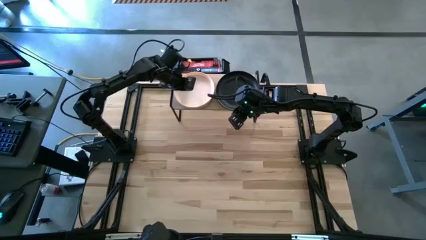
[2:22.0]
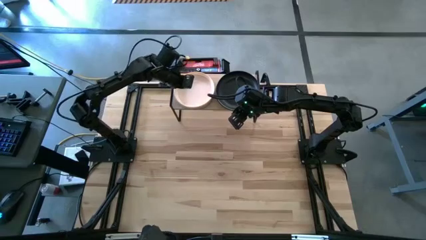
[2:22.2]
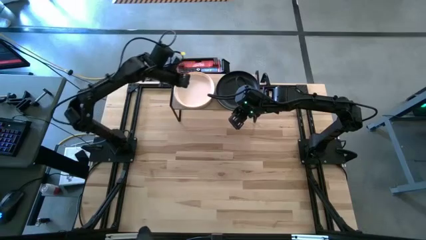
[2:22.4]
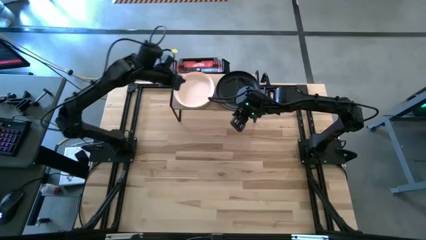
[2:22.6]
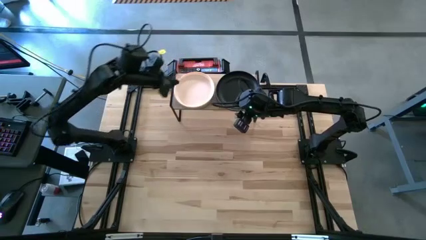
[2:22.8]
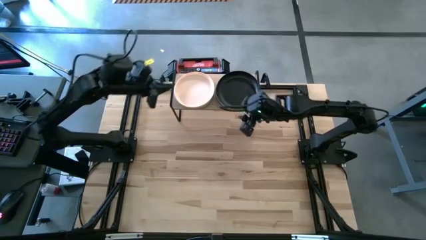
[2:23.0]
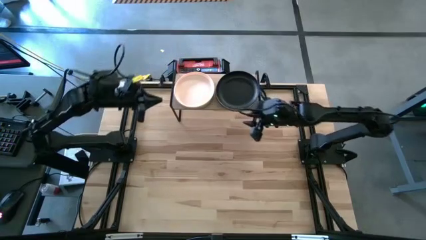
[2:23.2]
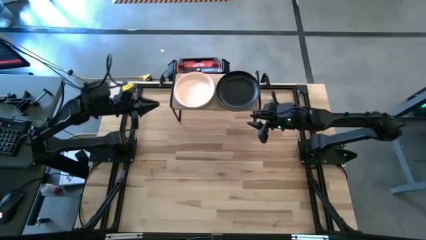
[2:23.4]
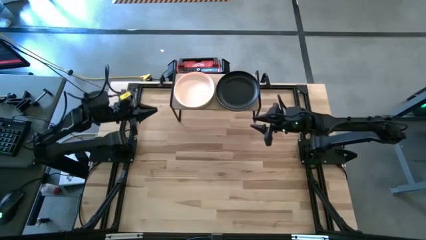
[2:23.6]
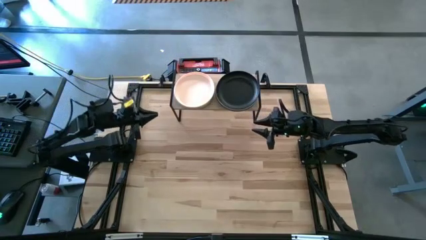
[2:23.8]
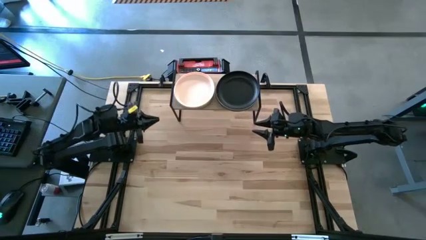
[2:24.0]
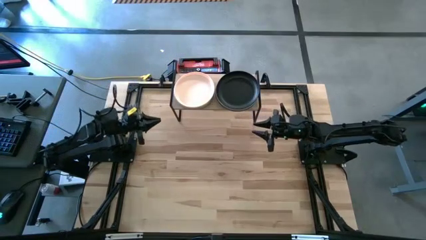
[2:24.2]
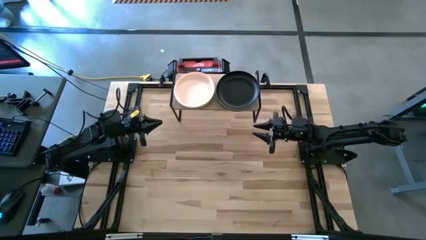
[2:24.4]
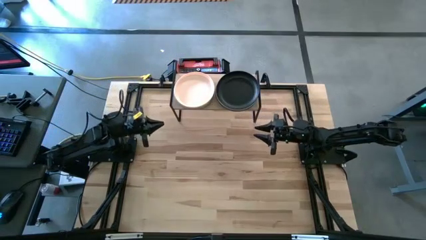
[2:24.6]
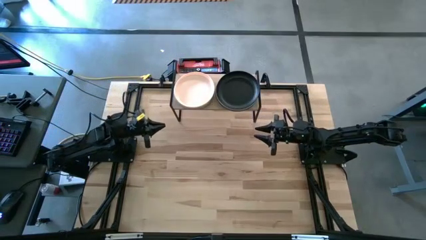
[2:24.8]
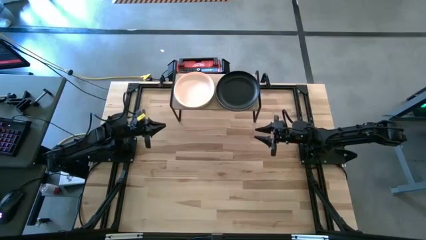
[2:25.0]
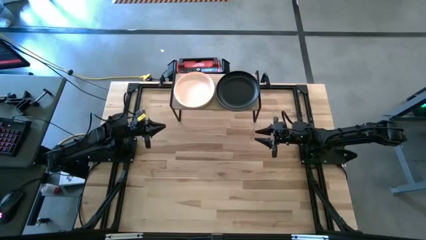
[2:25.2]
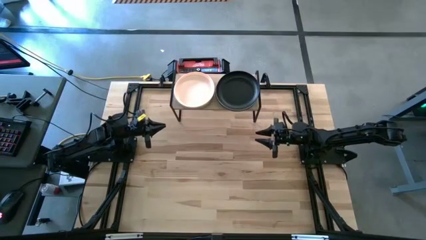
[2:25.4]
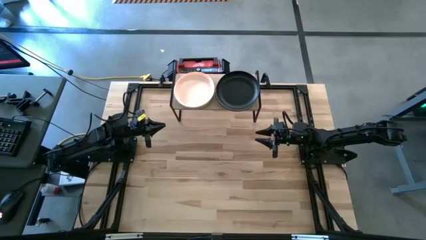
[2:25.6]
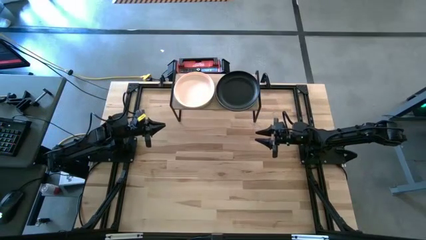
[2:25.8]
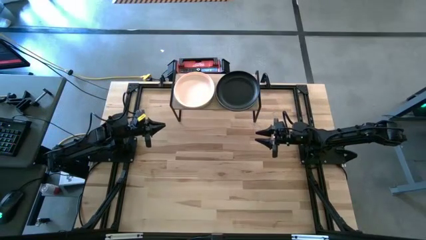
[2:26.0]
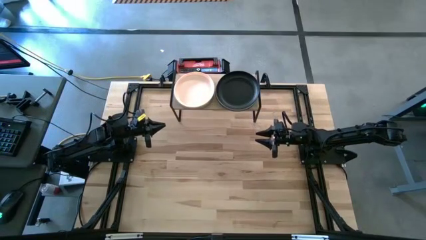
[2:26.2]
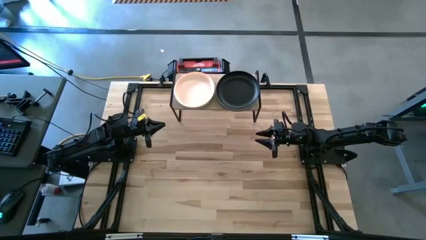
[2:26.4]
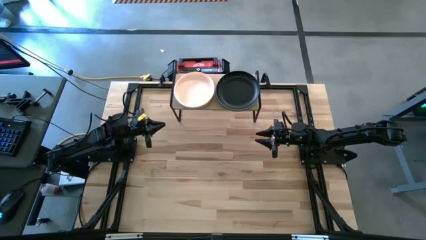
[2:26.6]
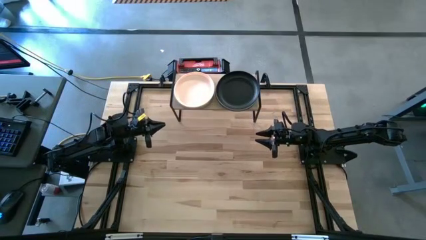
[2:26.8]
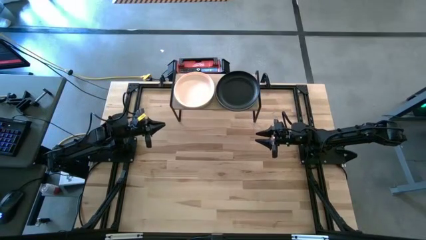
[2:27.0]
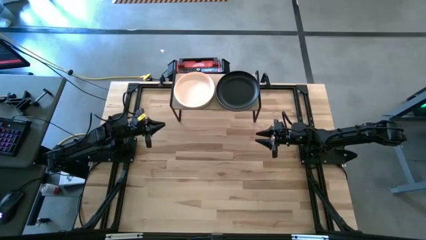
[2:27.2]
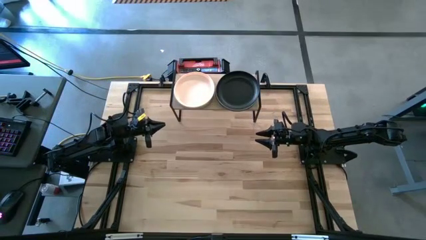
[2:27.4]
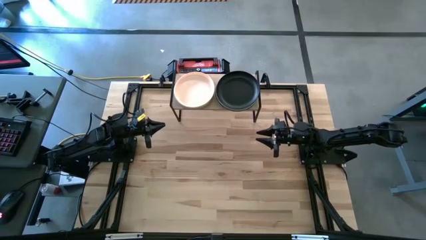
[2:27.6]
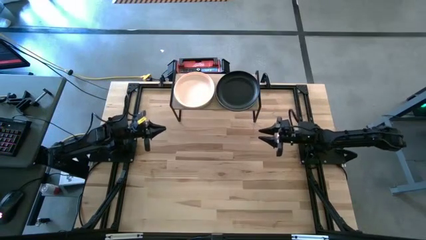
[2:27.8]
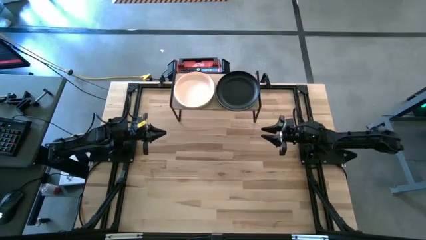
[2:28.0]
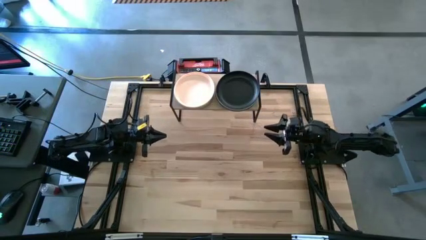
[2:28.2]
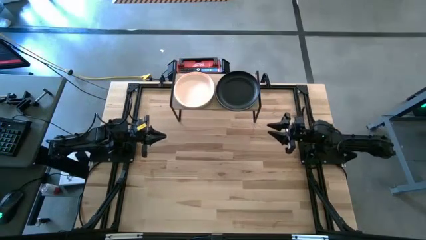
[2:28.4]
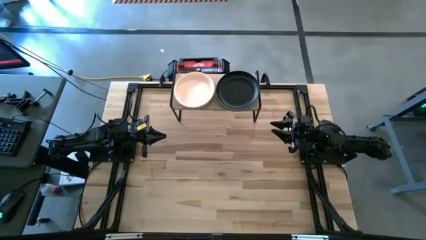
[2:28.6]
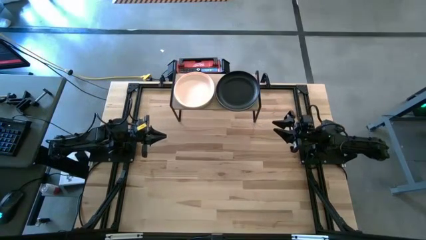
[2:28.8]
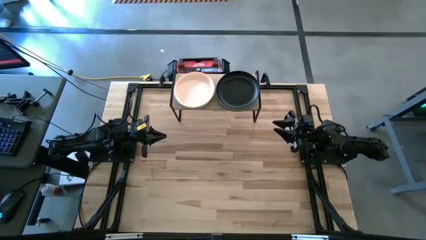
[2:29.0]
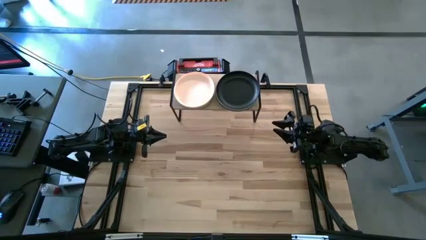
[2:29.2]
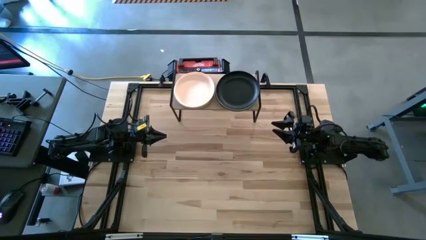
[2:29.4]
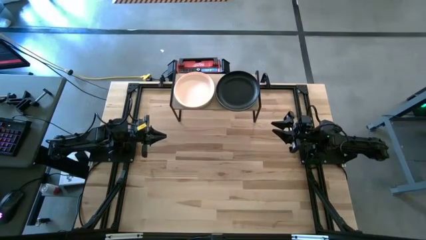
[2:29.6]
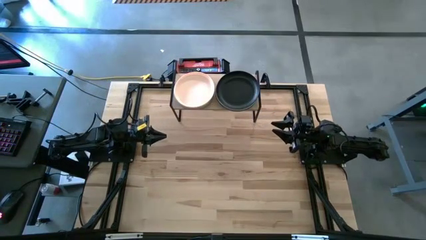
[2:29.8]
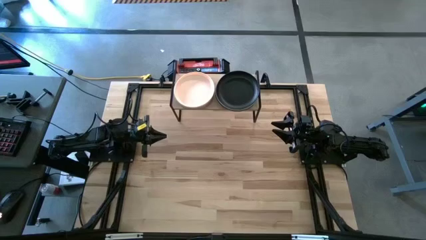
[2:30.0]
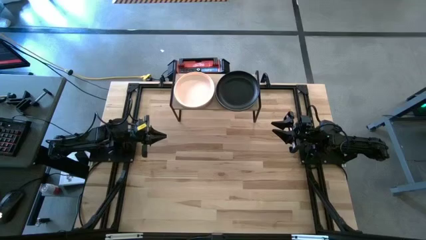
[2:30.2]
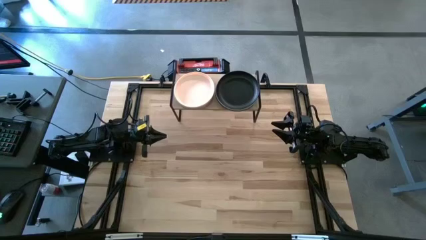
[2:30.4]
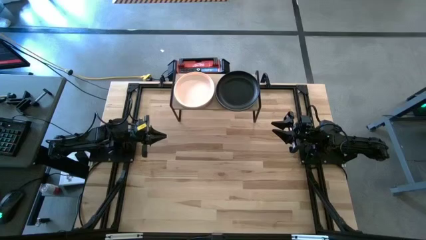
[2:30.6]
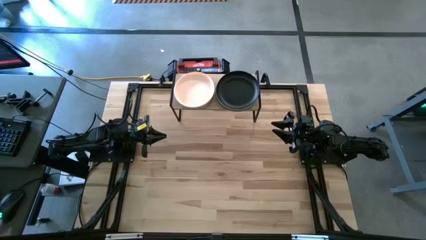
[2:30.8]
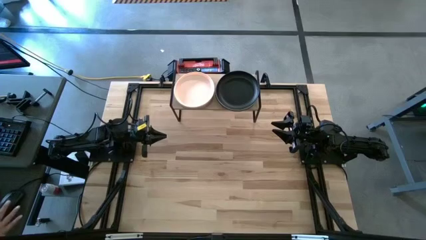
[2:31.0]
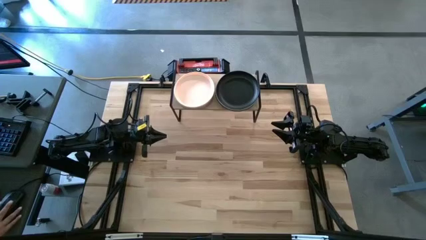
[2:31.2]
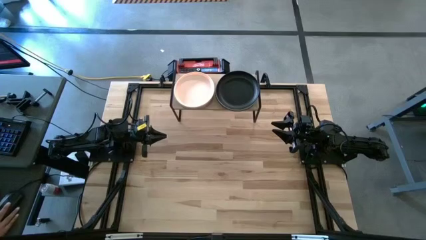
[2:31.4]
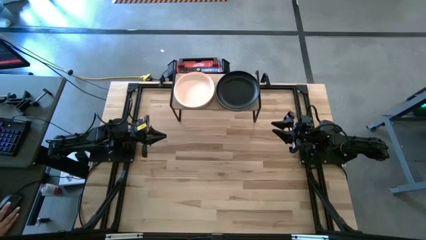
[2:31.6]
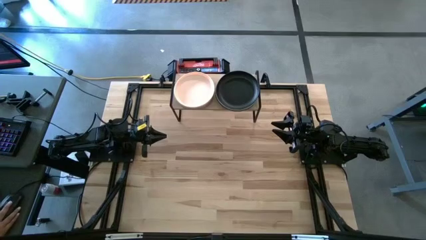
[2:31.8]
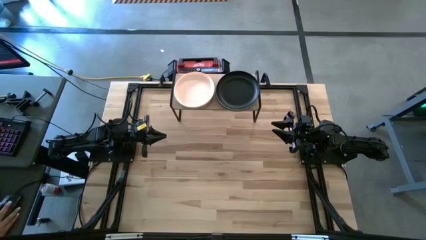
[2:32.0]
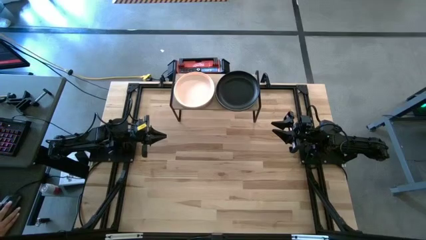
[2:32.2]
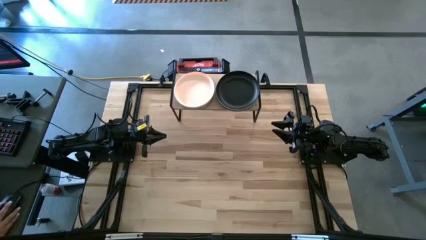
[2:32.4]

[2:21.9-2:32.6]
Task: Place and stack plates onto a shelf
Return to Home Position

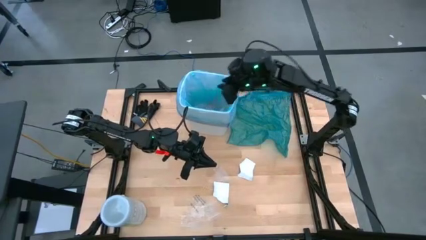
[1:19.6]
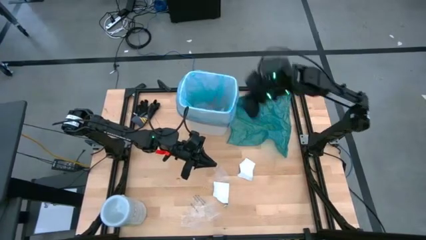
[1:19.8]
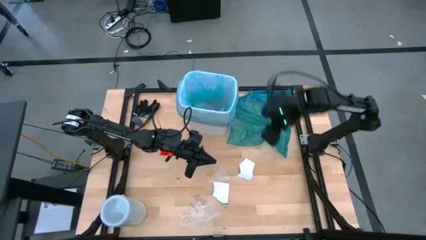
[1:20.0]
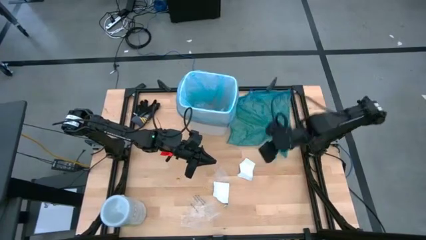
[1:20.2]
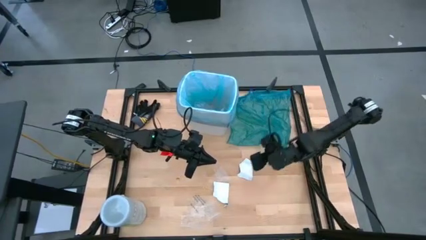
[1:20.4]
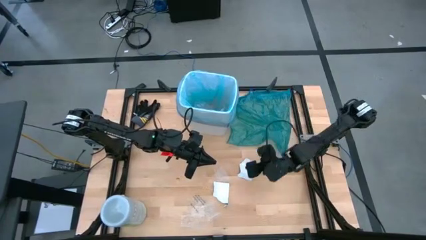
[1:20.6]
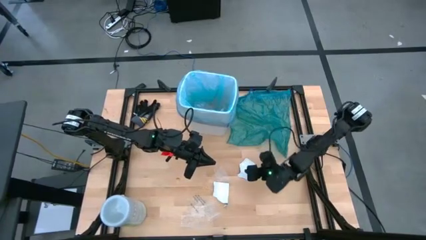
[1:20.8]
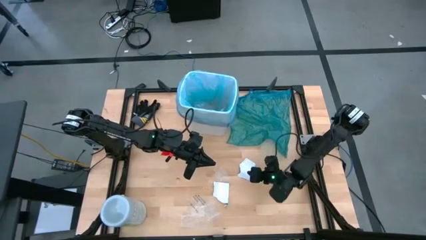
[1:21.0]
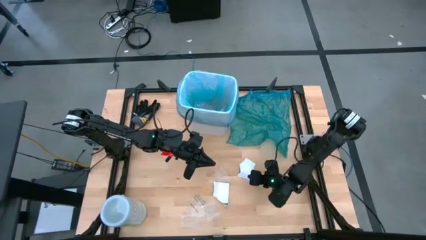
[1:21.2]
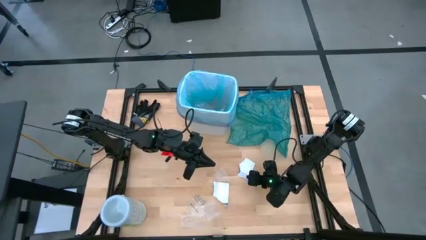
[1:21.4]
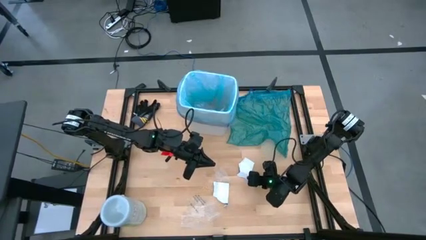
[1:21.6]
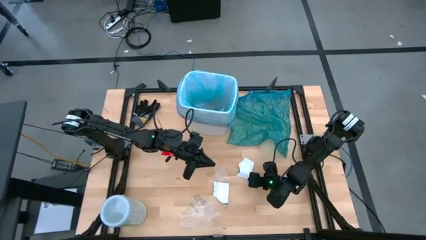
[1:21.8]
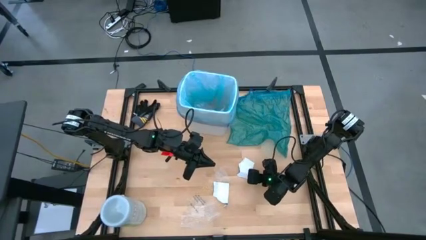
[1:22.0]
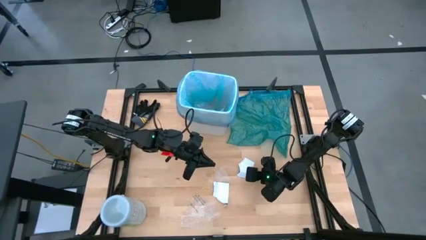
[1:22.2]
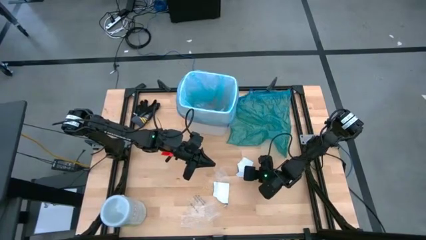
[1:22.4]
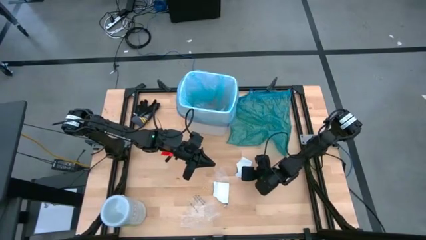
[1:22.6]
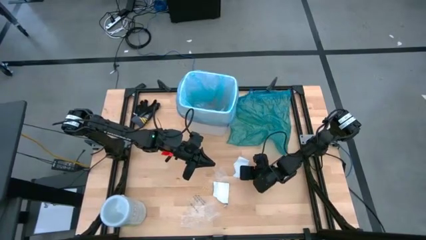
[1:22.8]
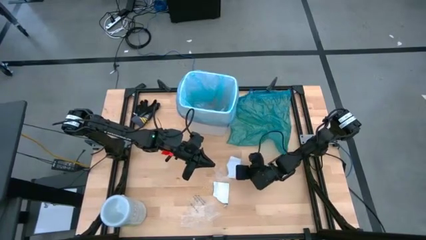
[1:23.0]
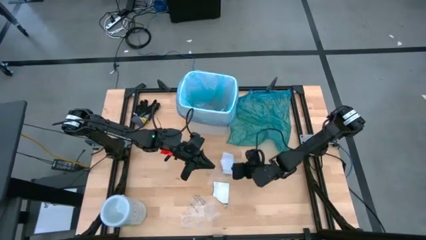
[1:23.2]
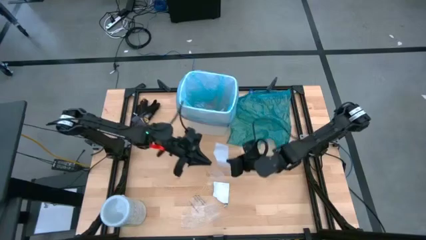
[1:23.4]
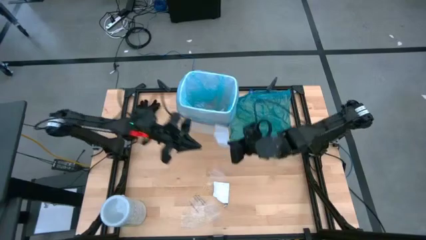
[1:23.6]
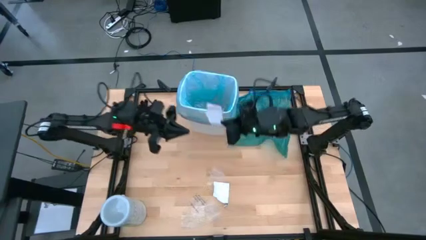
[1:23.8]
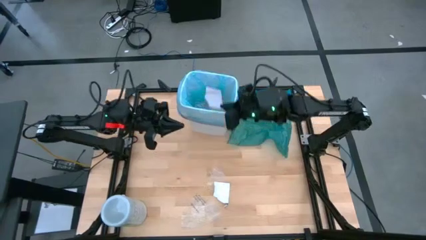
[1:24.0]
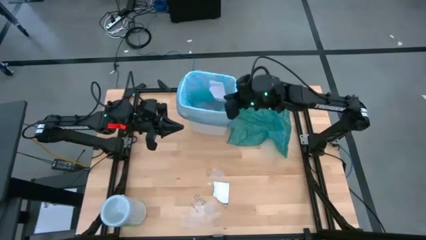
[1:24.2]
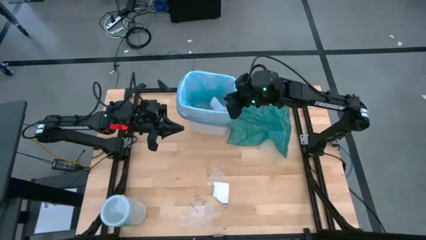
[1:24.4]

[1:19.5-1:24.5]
Task: place trash/remove bag and relplace
Put the white magazine paper into the trash bin

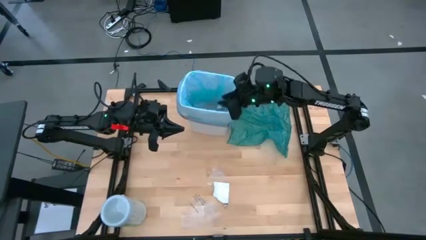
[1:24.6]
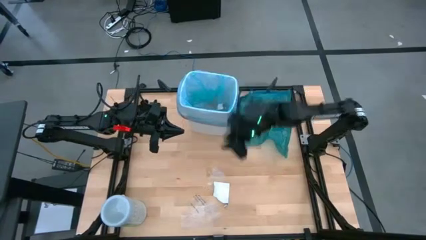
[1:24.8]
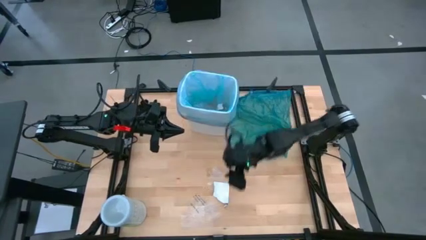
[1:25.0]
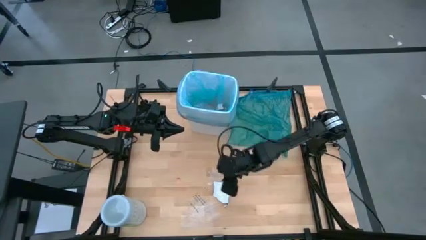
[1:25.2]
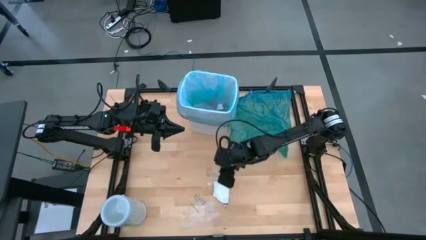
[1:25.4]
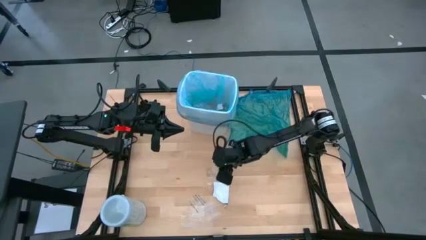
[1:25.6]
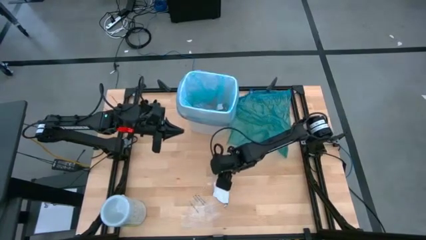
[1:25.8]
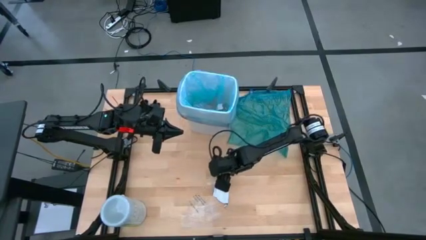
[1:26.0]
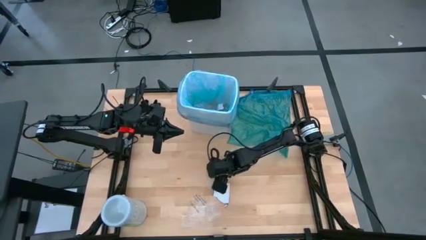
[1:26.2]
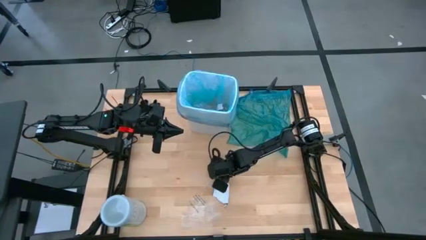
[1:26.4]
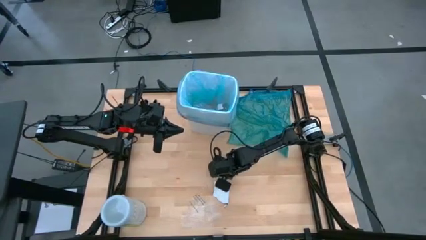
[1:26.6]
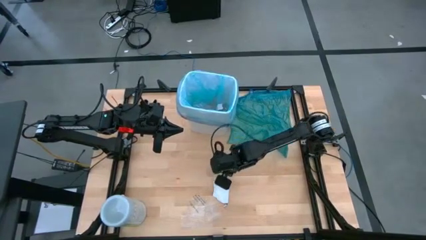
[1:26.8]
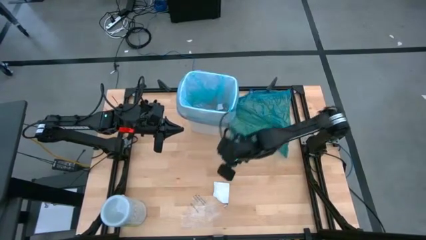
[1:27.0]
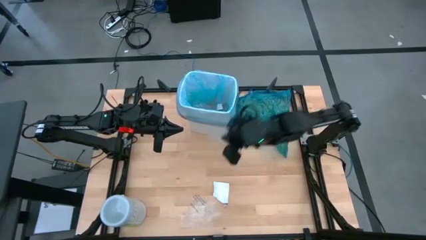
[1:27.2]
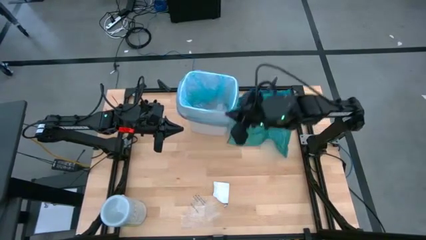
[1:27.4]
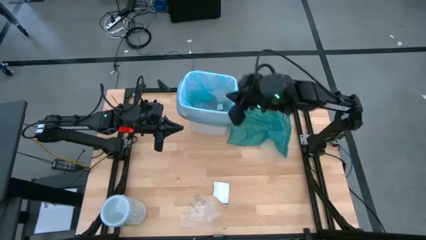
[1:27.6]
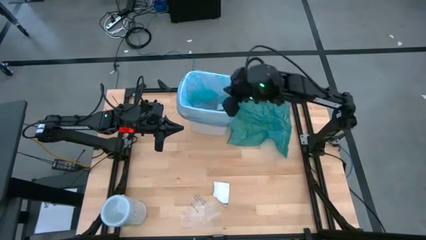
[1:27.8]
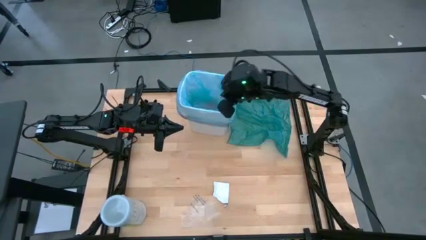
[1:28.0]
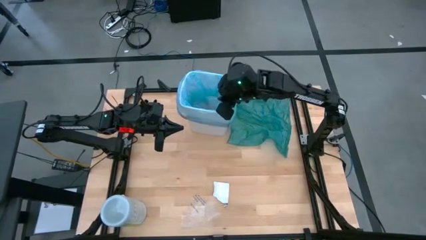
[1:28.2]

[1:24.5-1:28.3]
Put the transparent plastic into the trash bin
